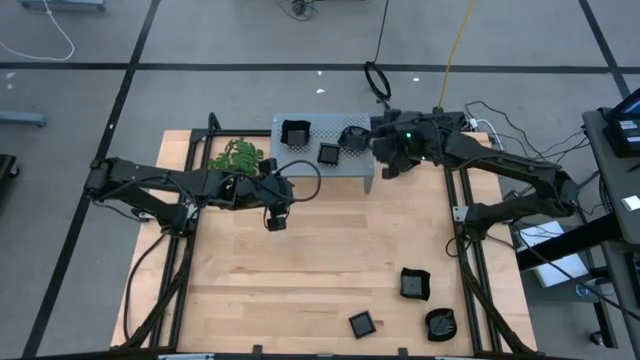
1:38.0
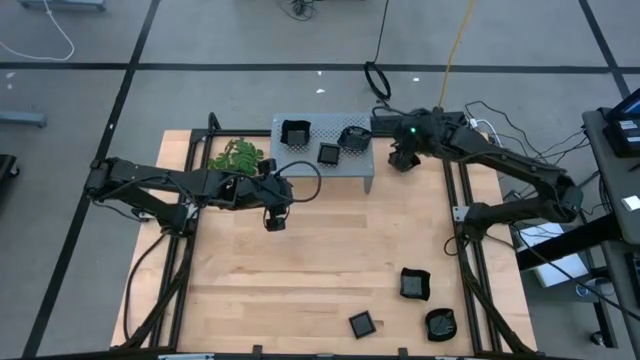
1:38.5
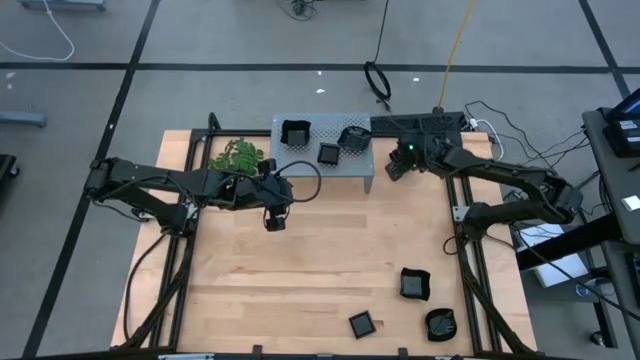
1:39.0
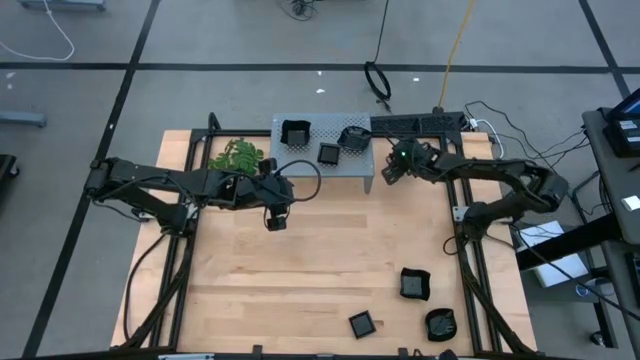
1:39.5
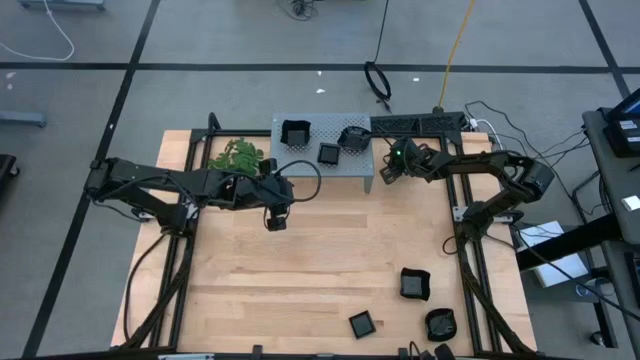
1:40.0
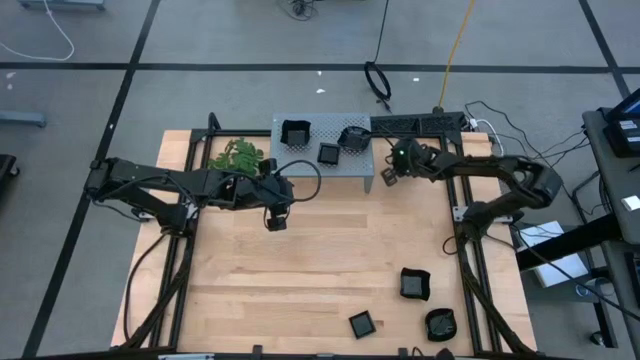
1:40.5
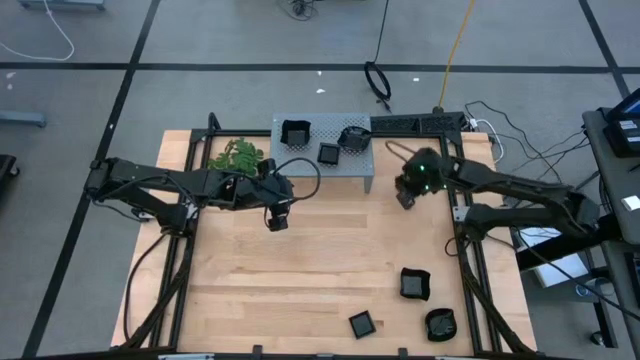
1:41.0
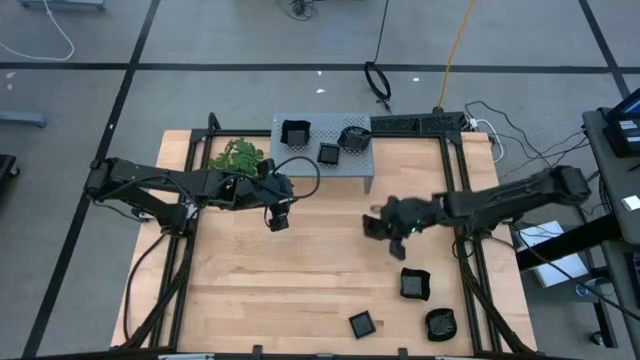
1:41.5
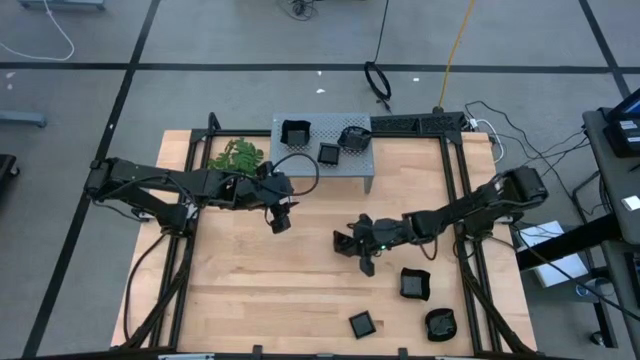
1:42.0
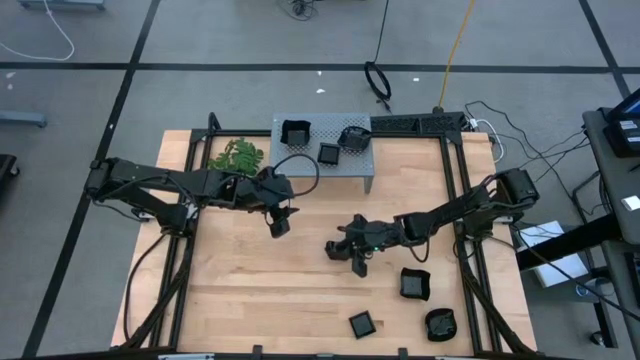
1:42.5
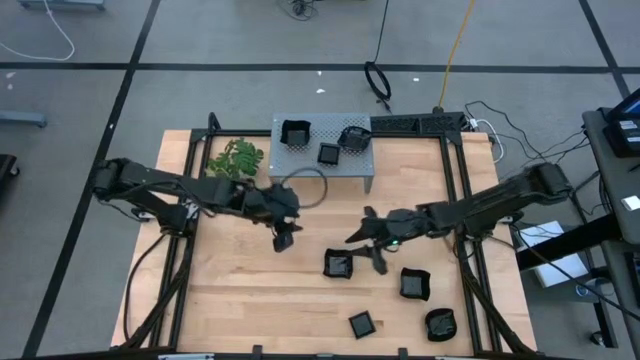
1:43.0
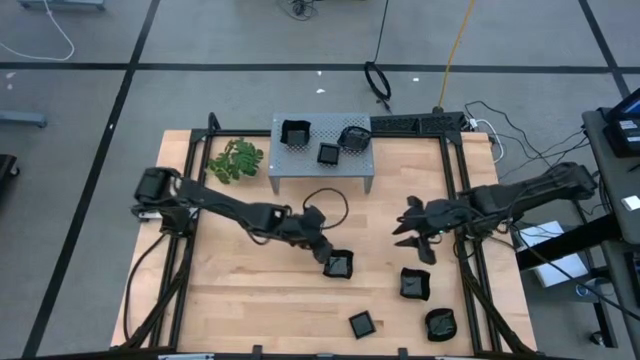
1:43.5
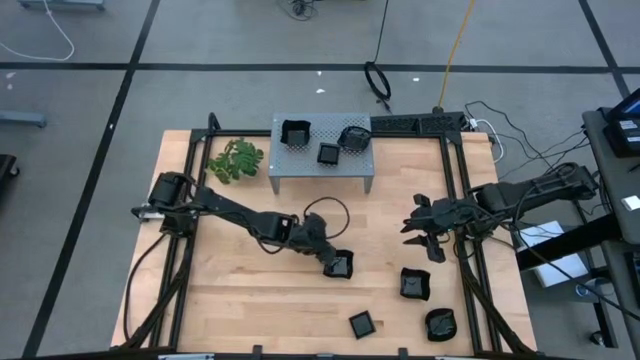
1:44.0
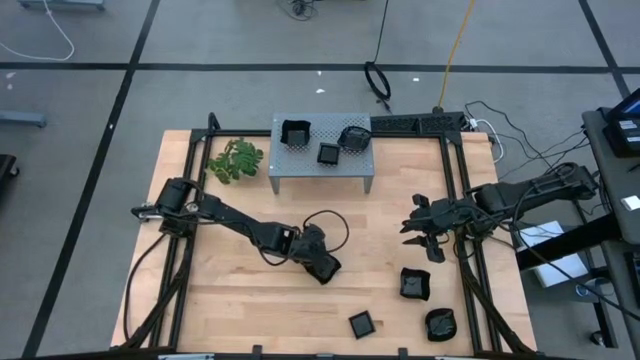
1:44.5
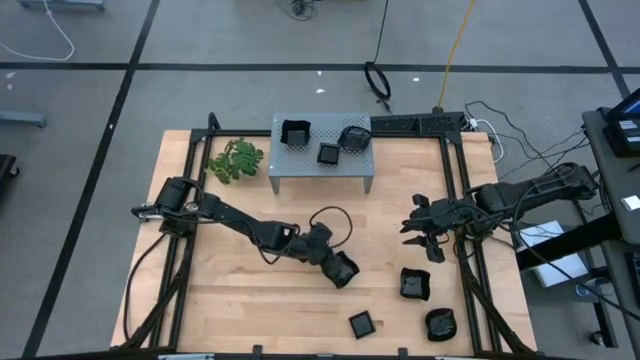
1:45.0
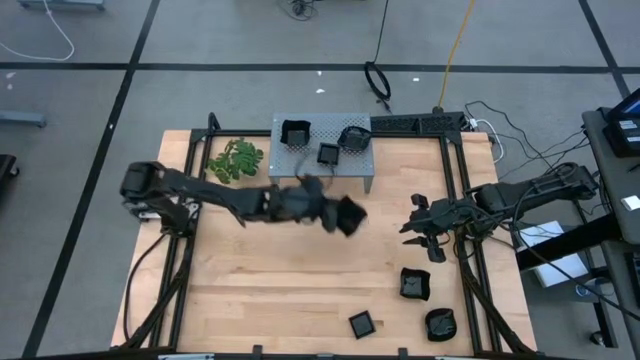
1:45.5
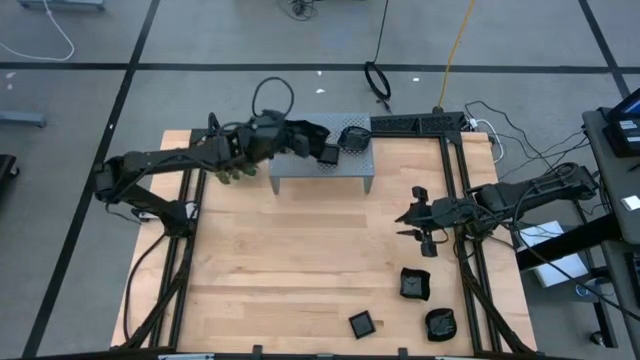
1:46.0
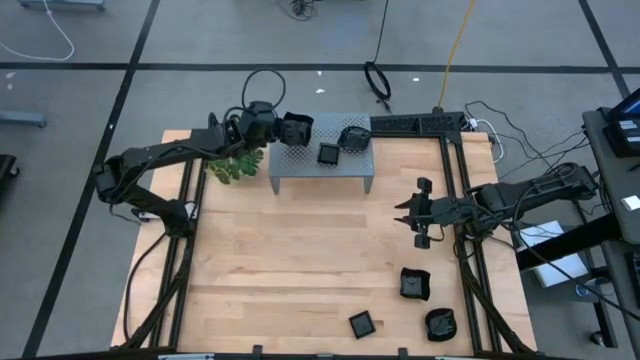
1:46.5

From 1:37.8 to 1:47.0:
Task: Pick & Place Mini shaped plates
Stack the black distorted square plate on top of the black distorted square plate on the shelf

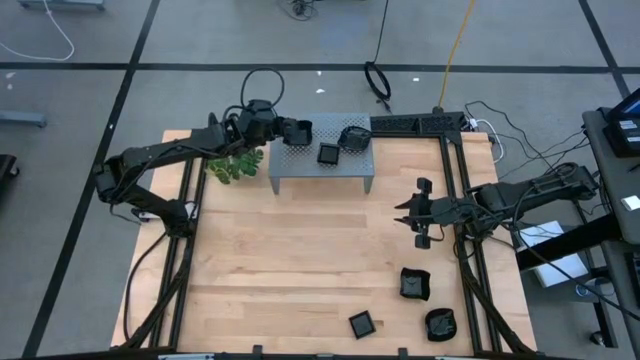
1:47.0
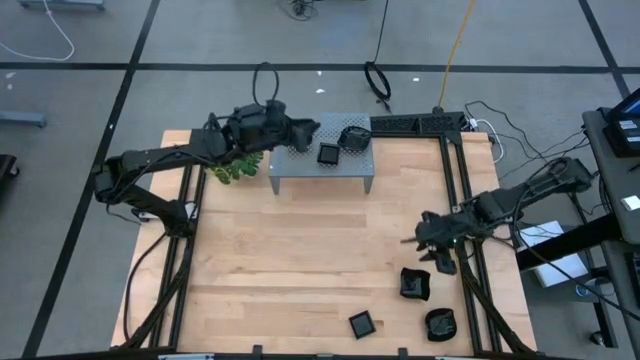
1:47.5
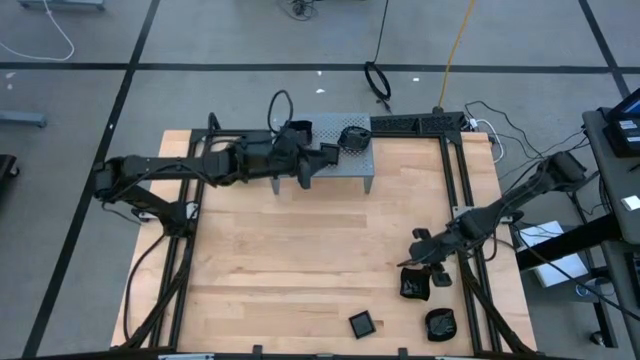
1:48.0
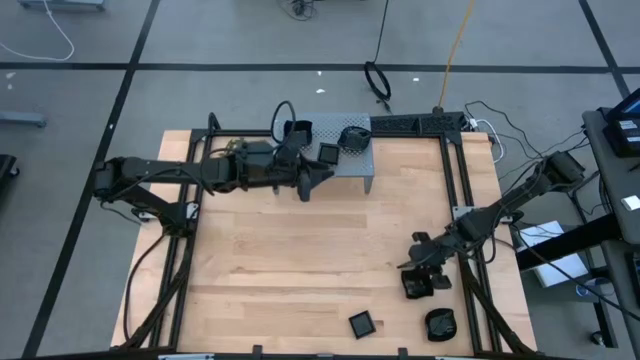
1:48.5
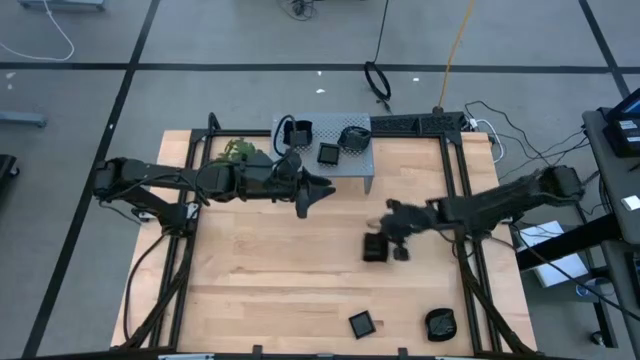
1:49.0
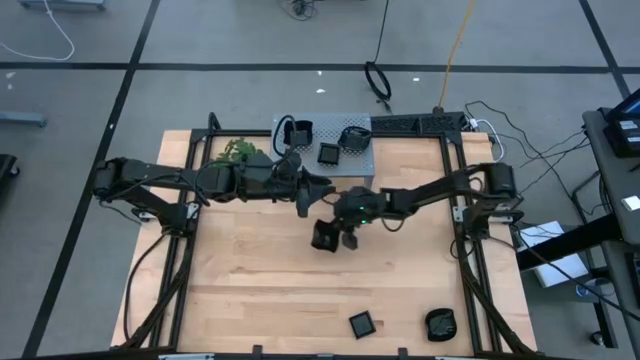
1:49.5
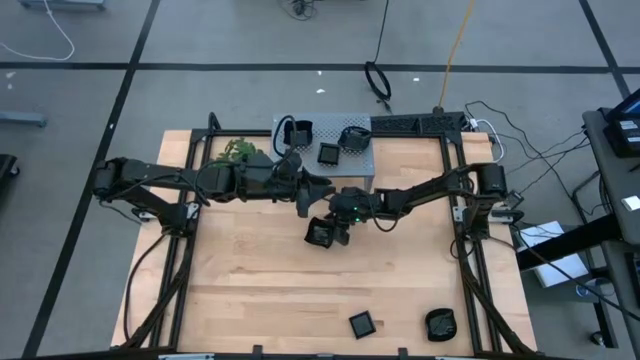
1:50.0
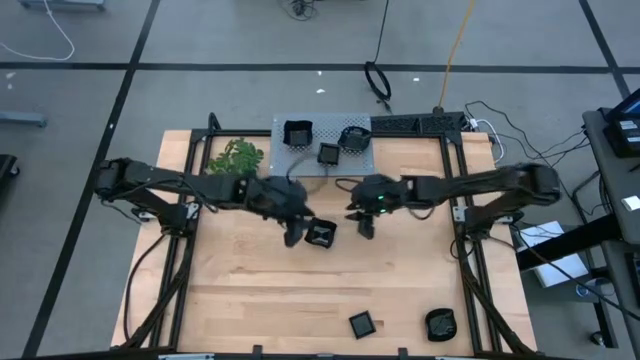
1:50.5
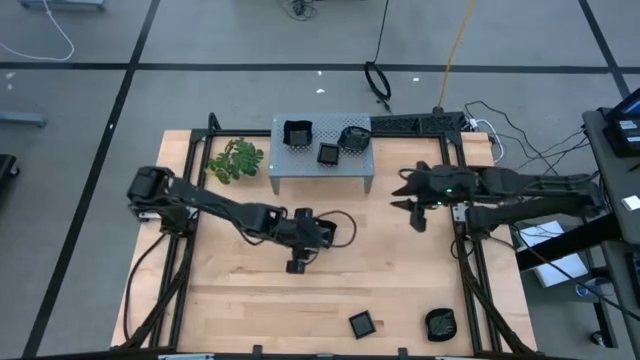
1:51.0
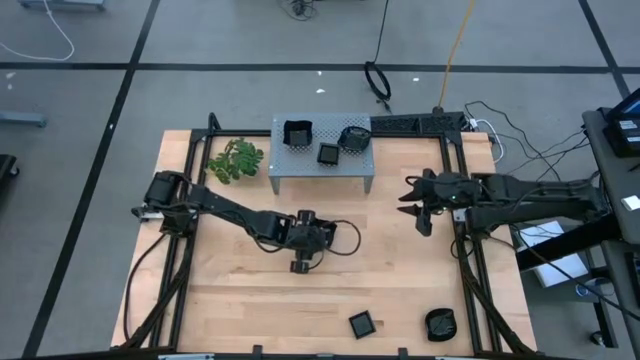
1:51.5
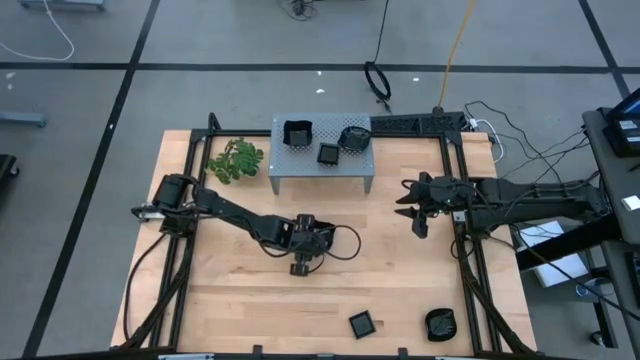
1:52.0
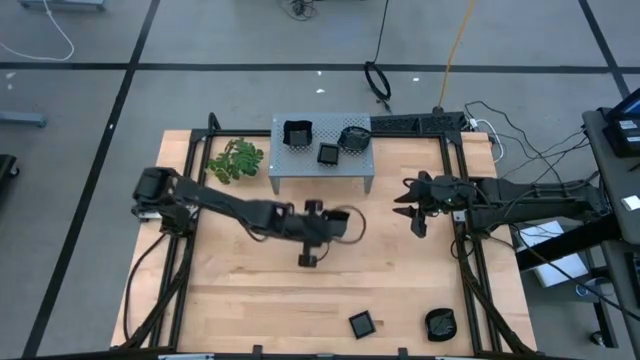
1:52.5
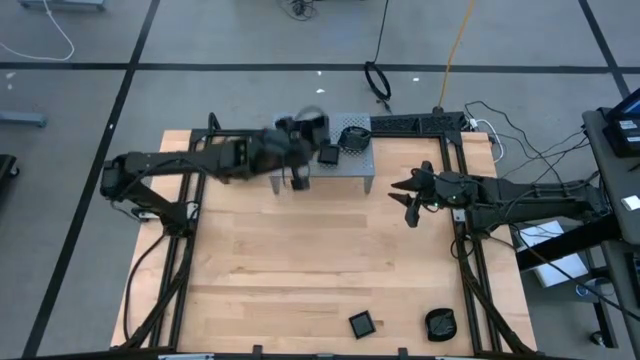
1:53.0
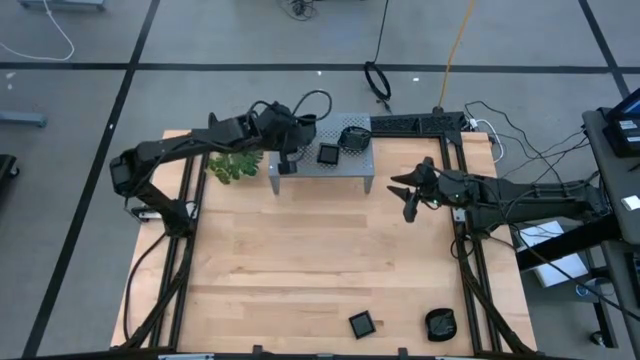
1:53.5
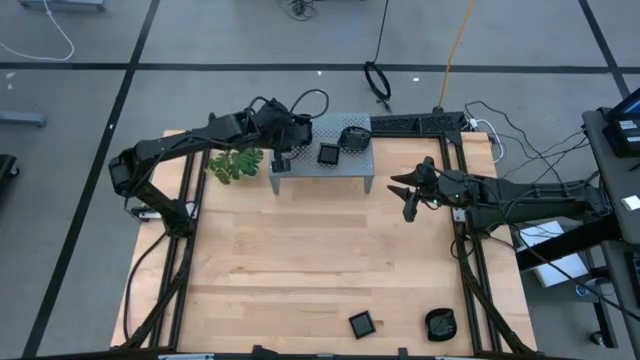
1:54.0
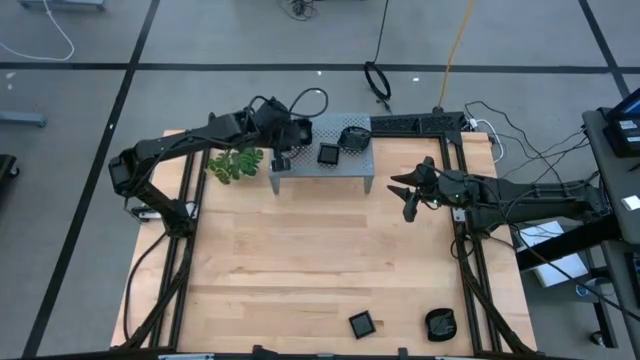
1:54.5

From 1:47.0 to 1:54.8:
Stack the black distorted square plate on top of the black distorted square plate on the shelf

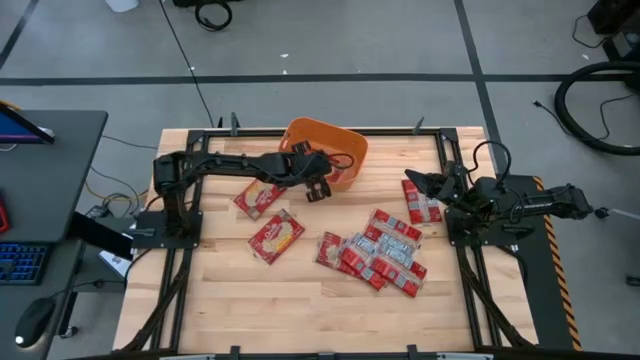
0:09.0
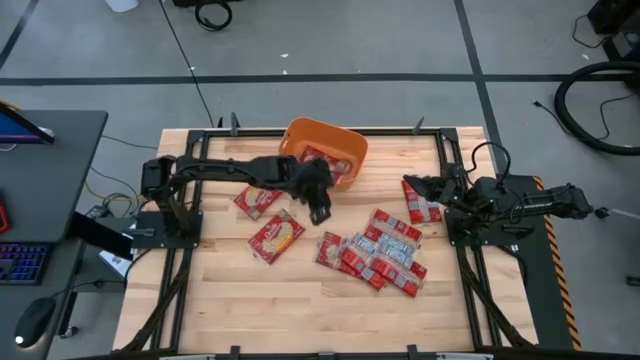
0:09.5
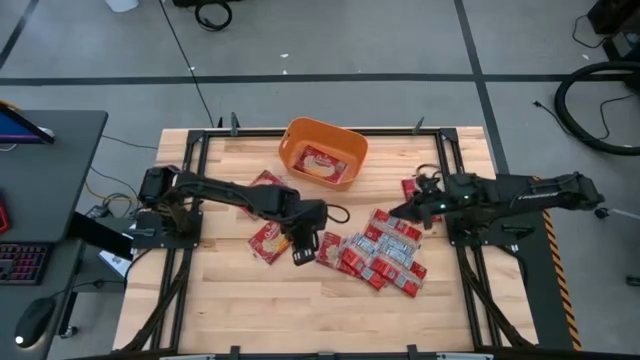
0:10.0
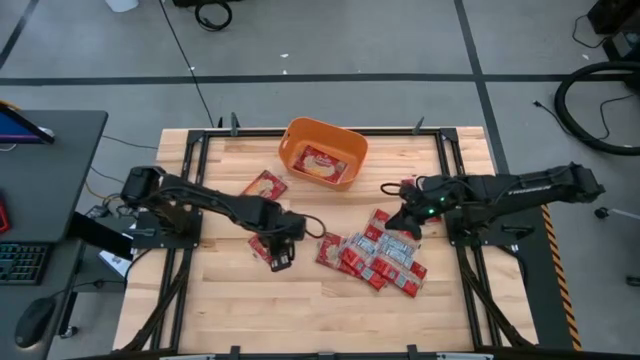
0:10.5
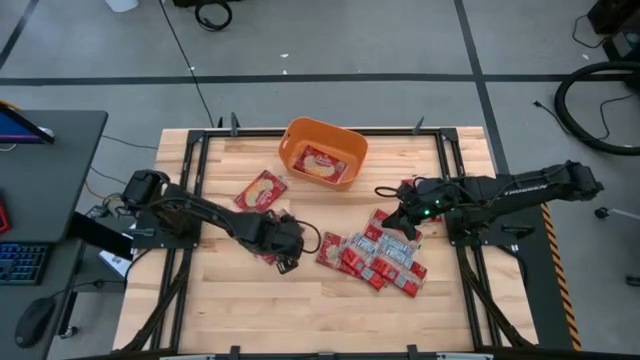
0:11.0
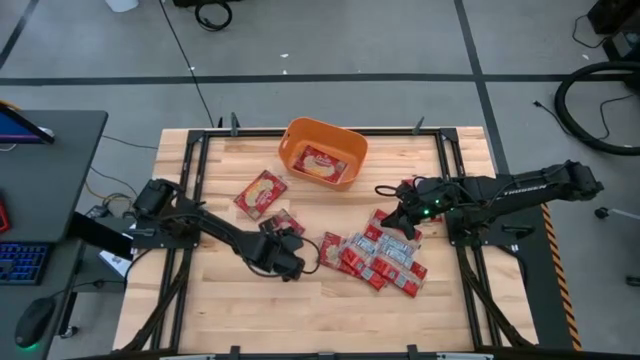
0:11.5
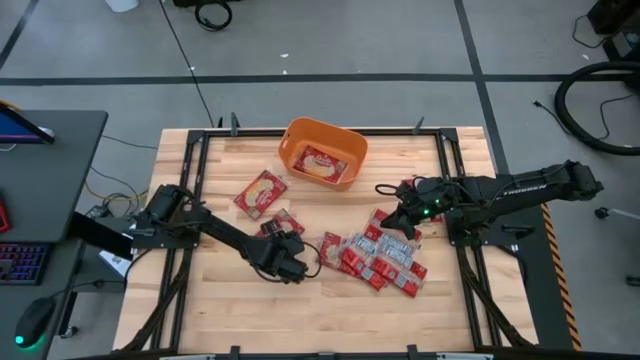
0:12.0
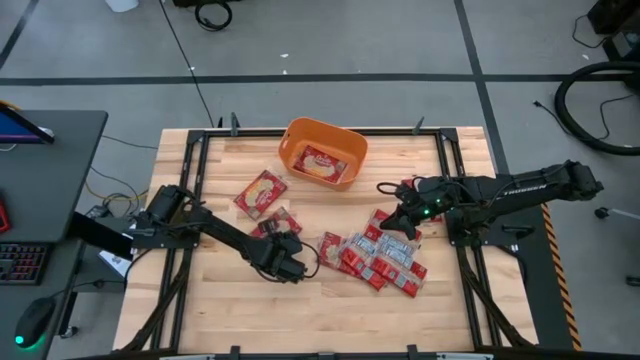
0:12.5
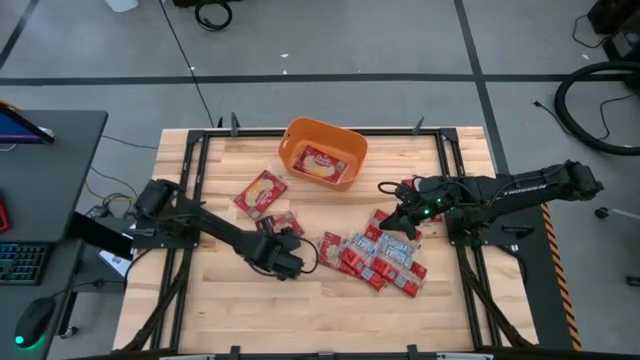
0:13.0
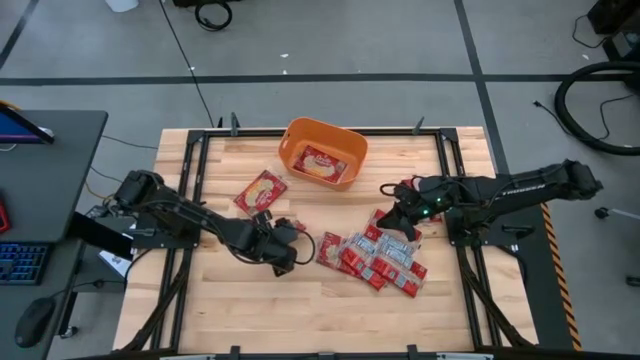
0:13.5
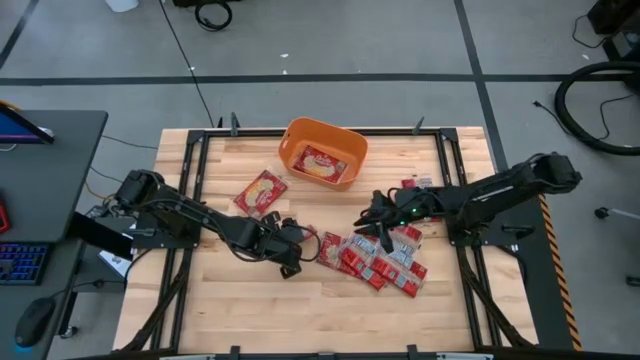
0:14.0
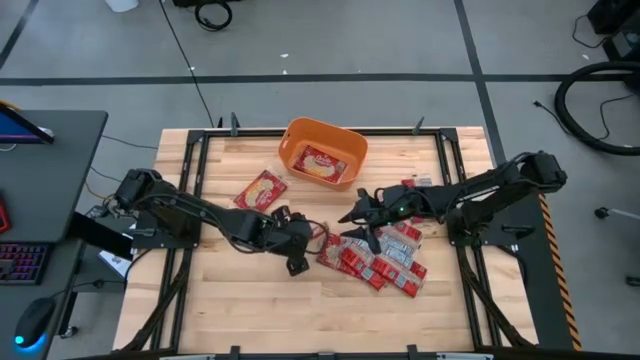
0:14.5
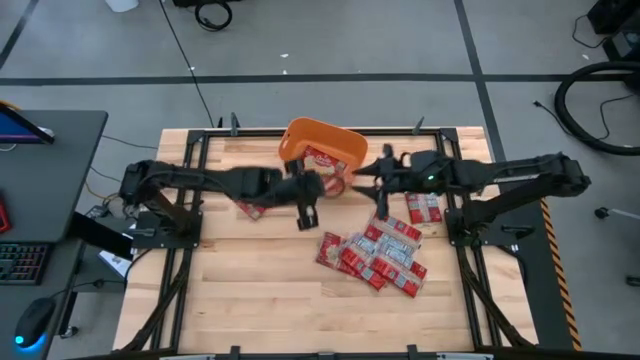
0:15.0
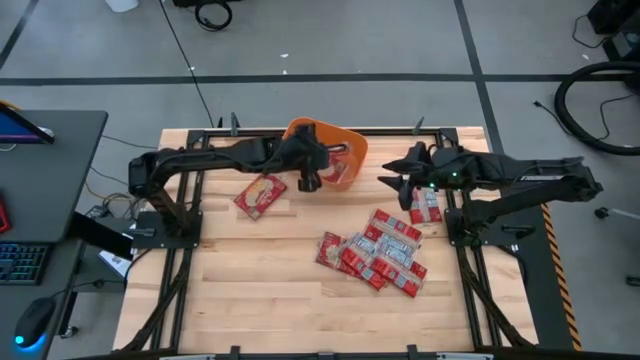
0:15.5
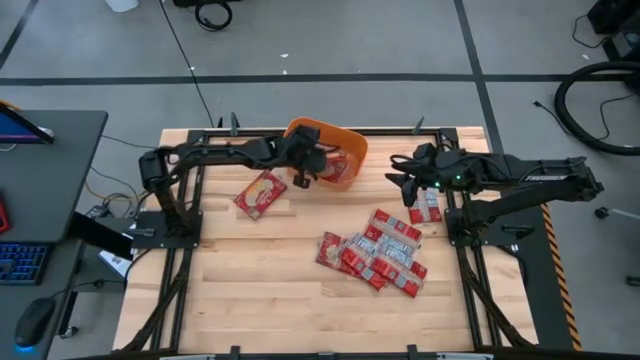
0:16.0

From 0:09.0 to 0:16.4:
Task: Sort popcorn bags into baskets
Put the red popcorn bag into the orange bin
